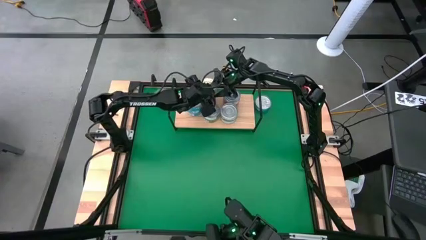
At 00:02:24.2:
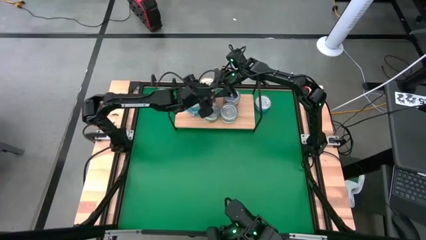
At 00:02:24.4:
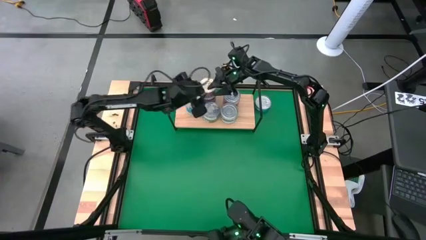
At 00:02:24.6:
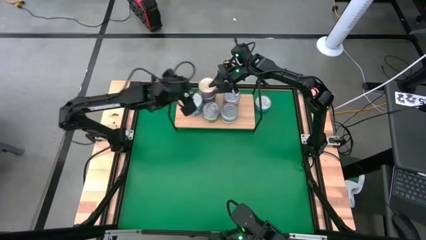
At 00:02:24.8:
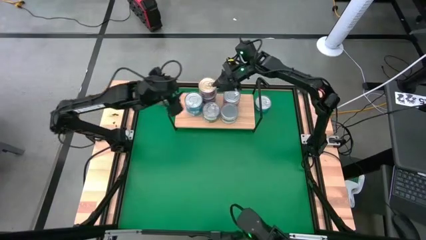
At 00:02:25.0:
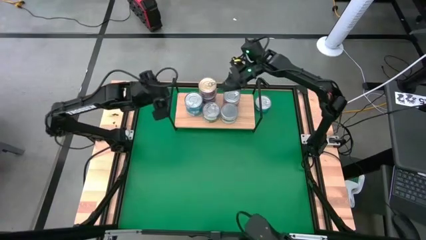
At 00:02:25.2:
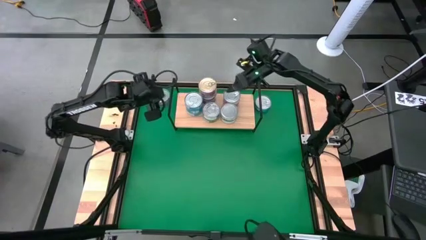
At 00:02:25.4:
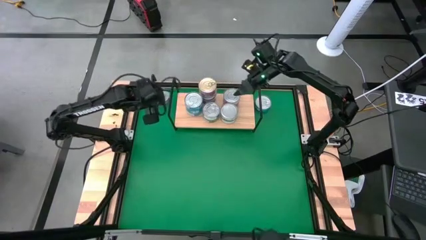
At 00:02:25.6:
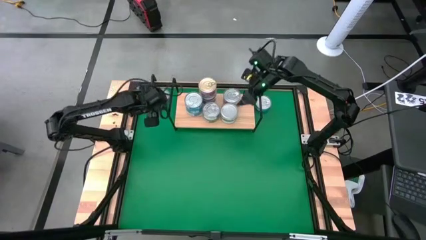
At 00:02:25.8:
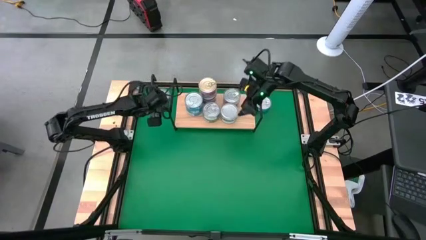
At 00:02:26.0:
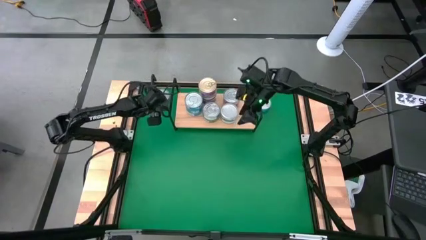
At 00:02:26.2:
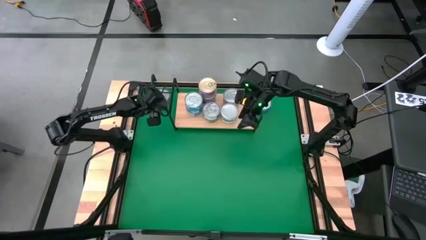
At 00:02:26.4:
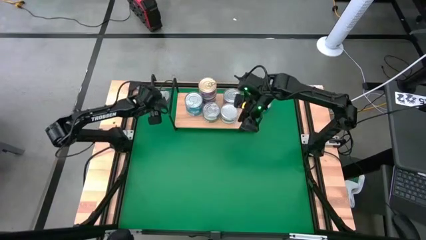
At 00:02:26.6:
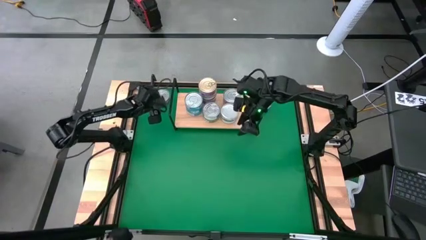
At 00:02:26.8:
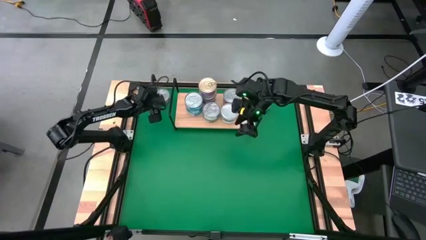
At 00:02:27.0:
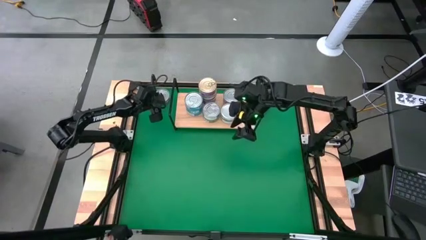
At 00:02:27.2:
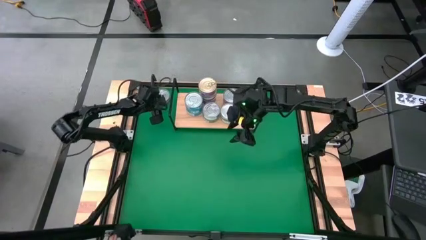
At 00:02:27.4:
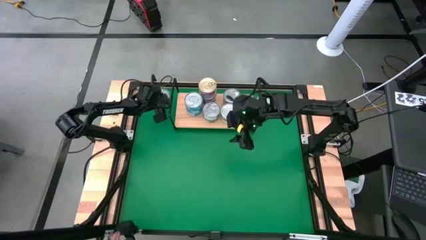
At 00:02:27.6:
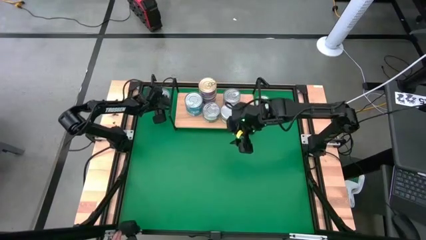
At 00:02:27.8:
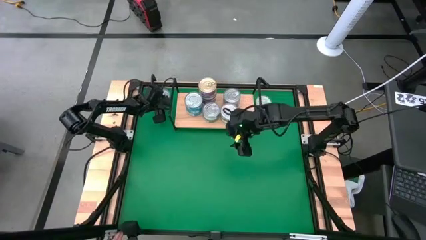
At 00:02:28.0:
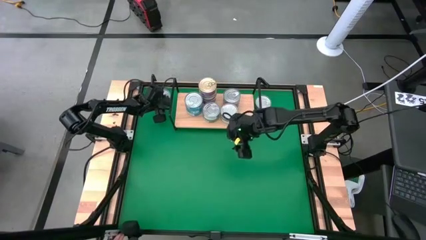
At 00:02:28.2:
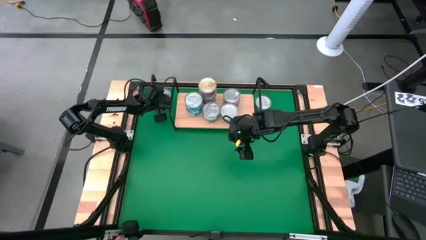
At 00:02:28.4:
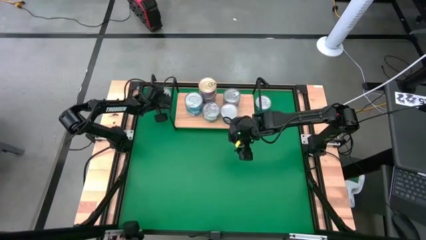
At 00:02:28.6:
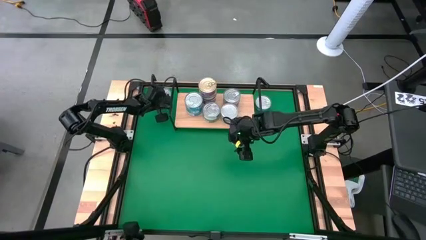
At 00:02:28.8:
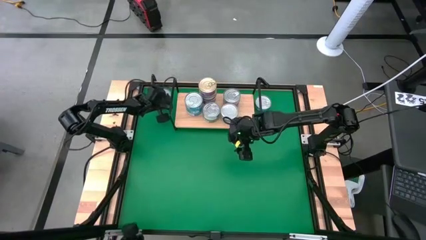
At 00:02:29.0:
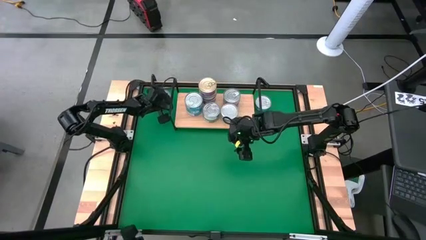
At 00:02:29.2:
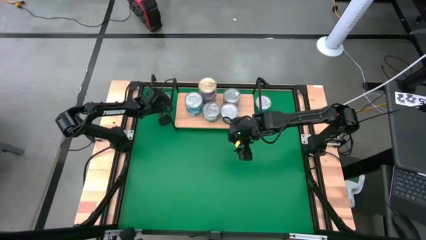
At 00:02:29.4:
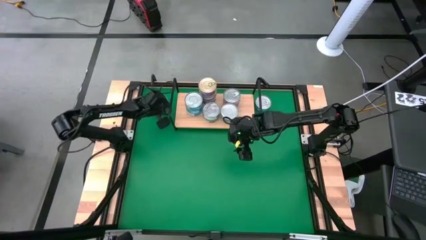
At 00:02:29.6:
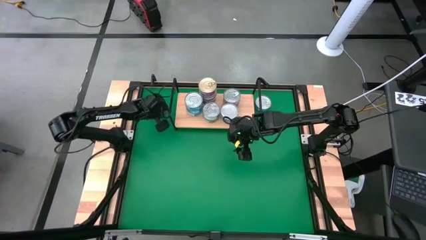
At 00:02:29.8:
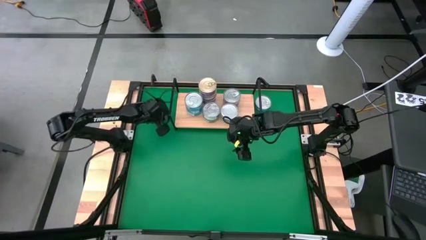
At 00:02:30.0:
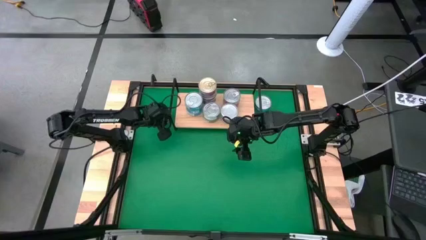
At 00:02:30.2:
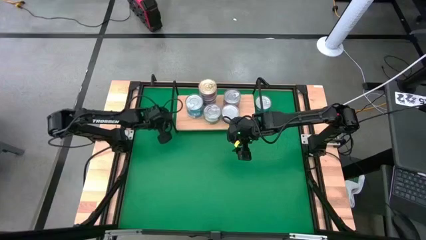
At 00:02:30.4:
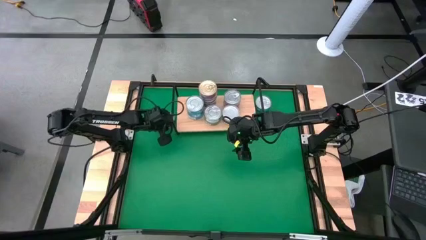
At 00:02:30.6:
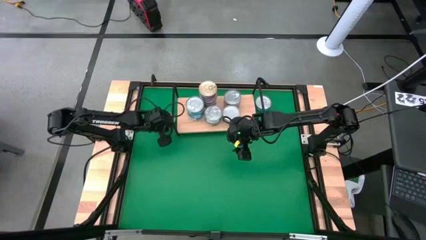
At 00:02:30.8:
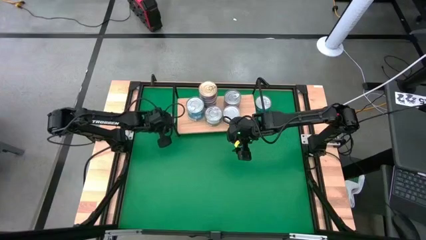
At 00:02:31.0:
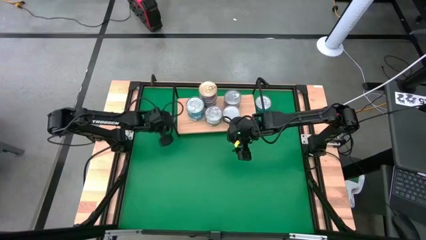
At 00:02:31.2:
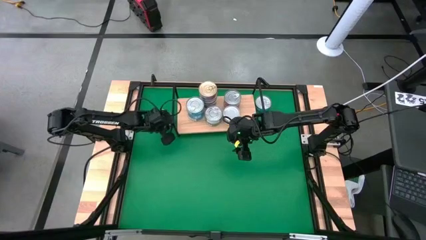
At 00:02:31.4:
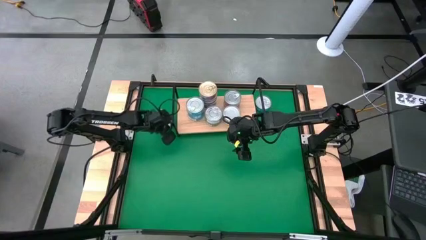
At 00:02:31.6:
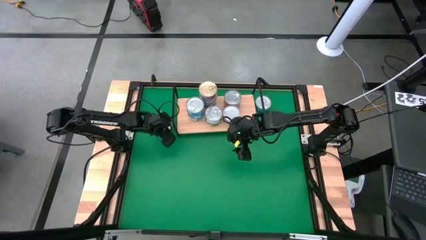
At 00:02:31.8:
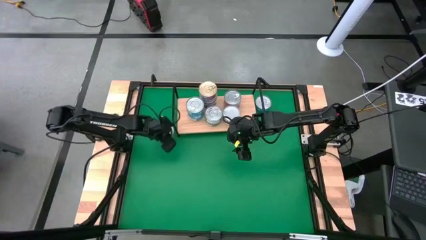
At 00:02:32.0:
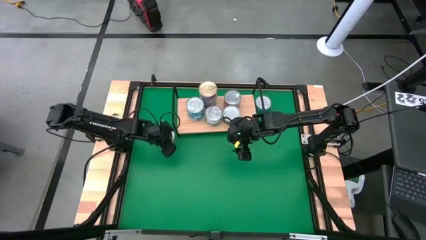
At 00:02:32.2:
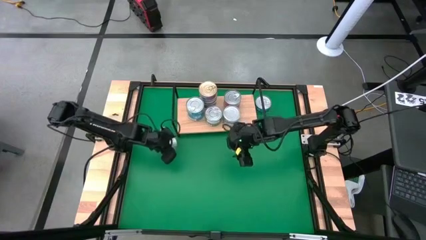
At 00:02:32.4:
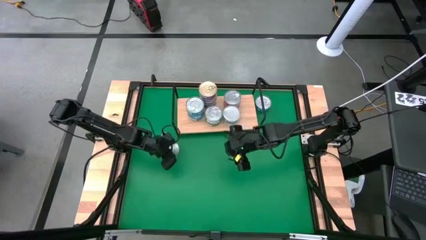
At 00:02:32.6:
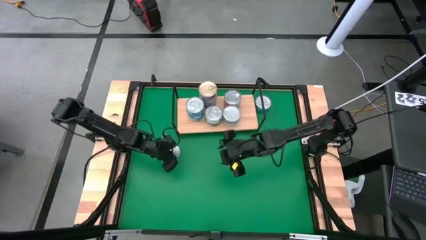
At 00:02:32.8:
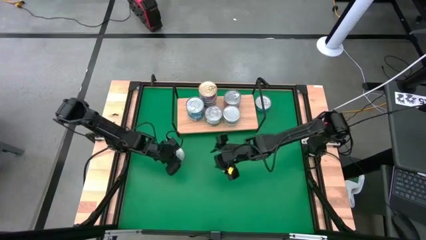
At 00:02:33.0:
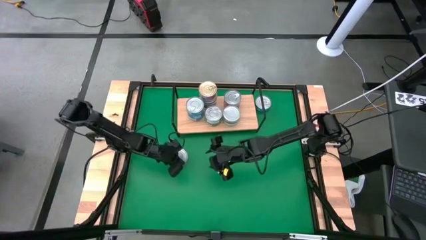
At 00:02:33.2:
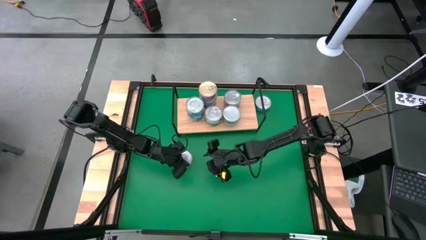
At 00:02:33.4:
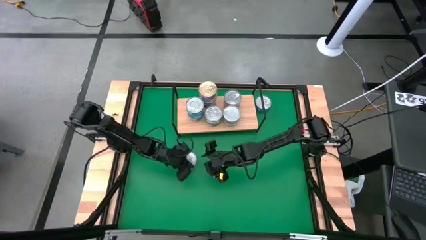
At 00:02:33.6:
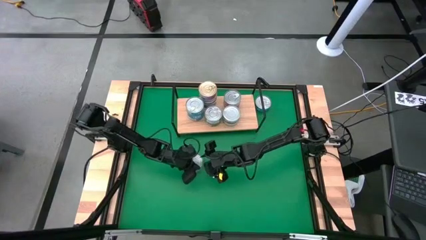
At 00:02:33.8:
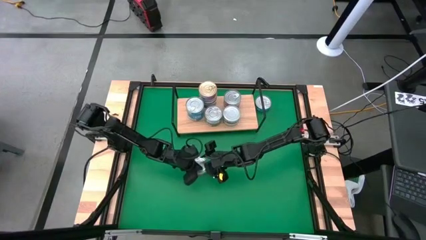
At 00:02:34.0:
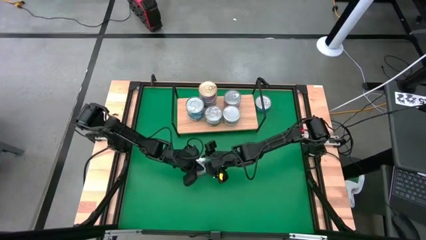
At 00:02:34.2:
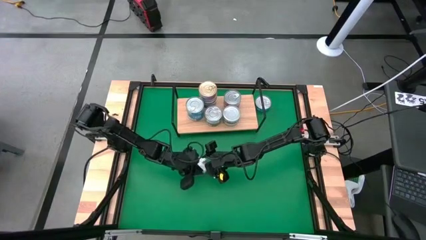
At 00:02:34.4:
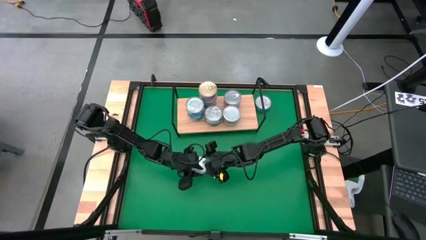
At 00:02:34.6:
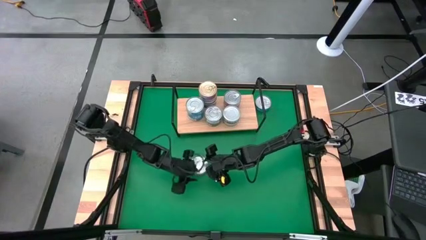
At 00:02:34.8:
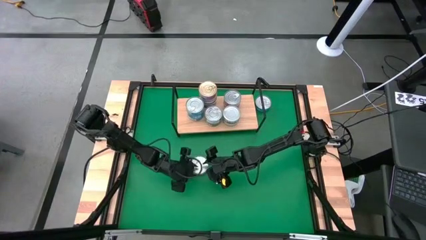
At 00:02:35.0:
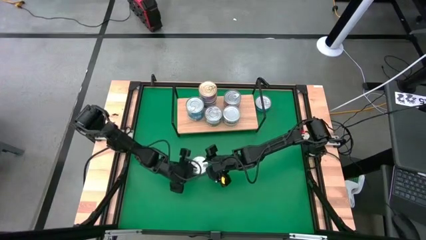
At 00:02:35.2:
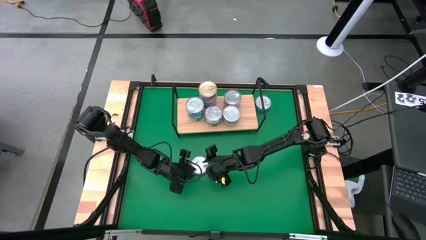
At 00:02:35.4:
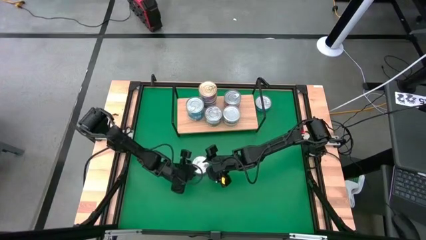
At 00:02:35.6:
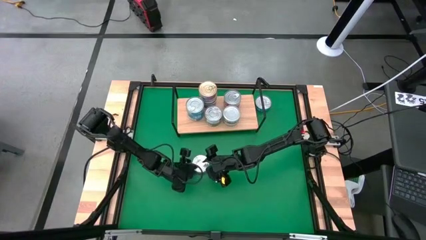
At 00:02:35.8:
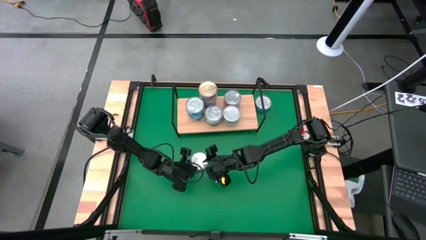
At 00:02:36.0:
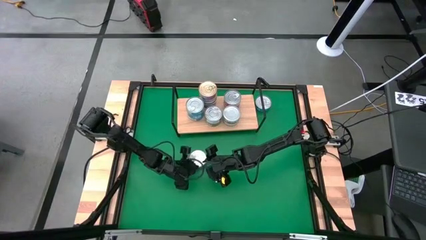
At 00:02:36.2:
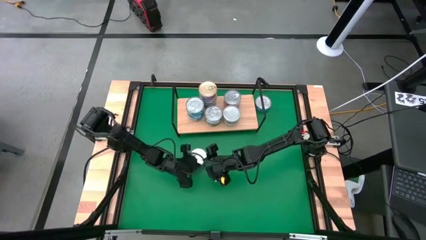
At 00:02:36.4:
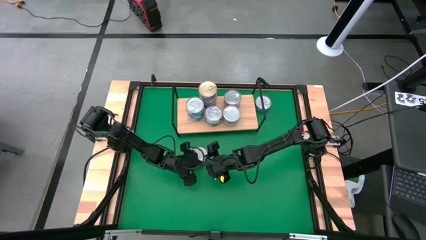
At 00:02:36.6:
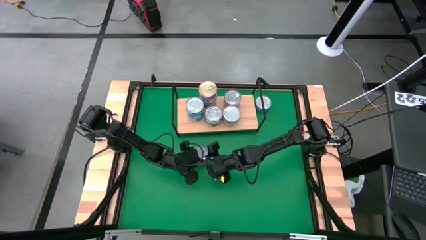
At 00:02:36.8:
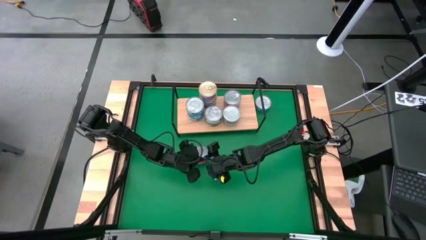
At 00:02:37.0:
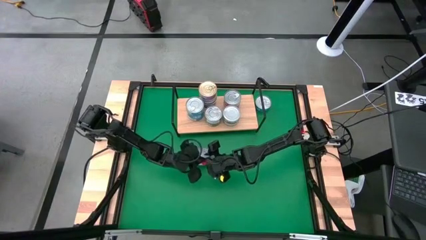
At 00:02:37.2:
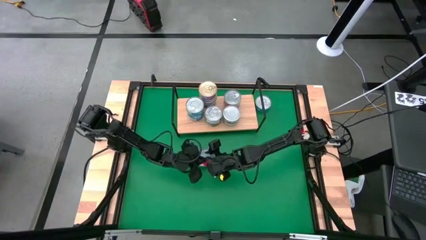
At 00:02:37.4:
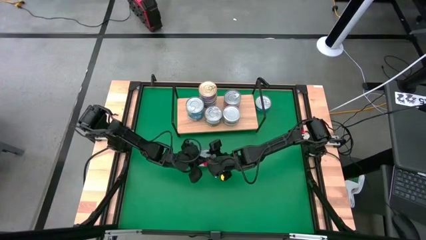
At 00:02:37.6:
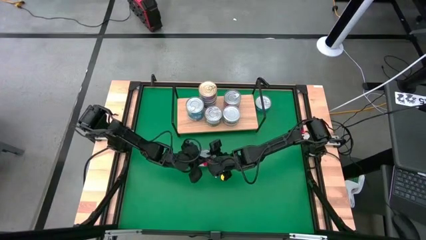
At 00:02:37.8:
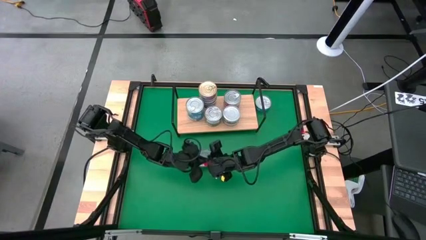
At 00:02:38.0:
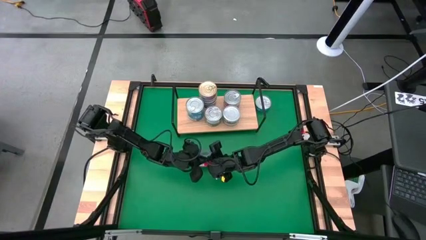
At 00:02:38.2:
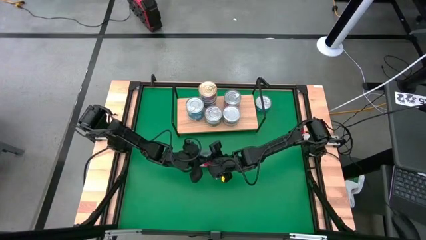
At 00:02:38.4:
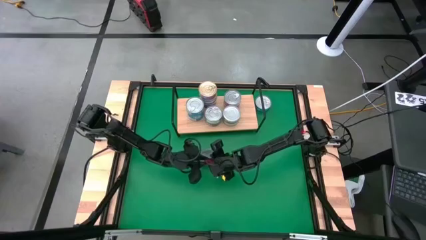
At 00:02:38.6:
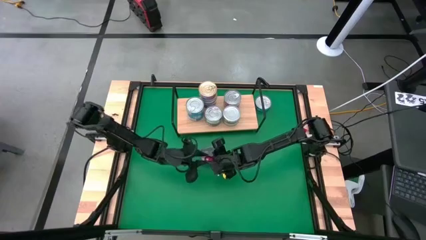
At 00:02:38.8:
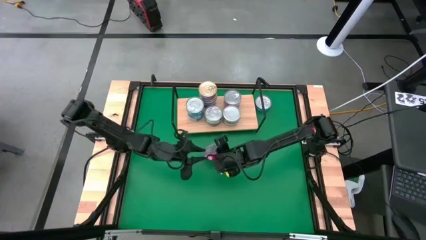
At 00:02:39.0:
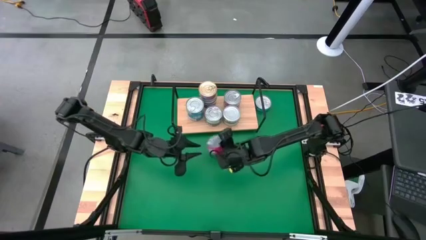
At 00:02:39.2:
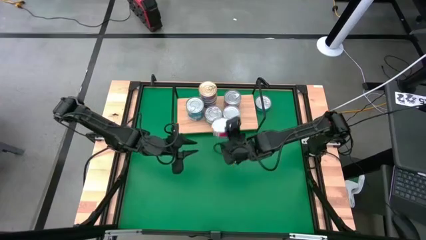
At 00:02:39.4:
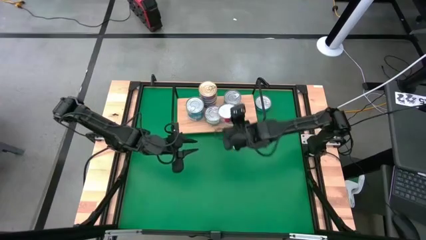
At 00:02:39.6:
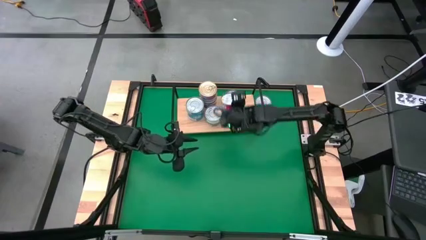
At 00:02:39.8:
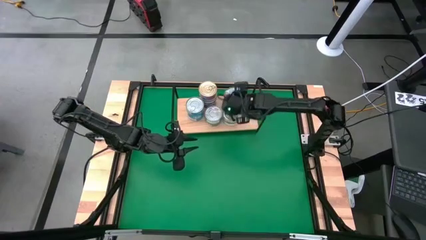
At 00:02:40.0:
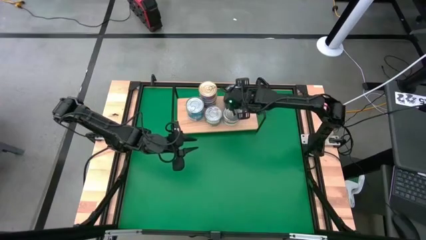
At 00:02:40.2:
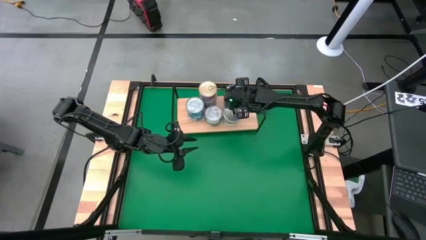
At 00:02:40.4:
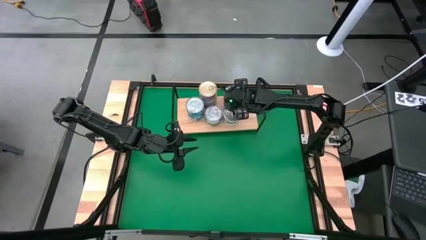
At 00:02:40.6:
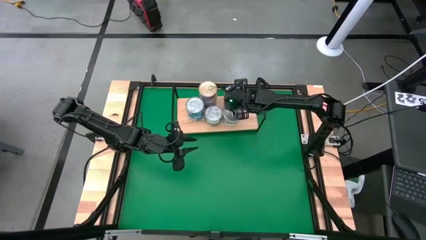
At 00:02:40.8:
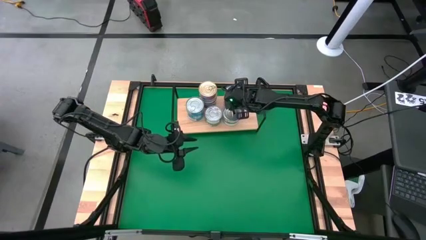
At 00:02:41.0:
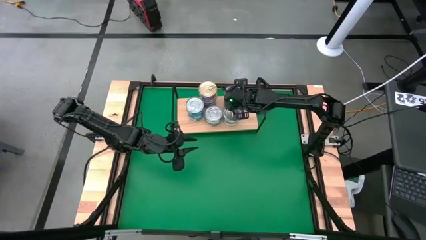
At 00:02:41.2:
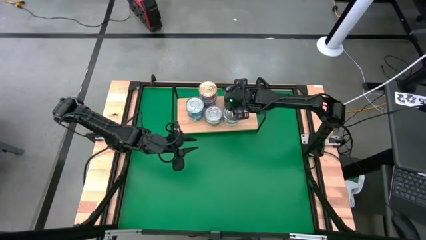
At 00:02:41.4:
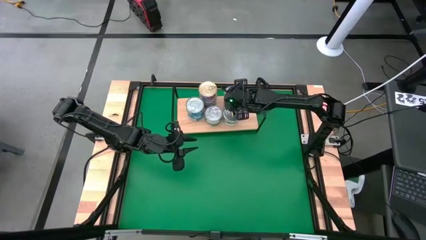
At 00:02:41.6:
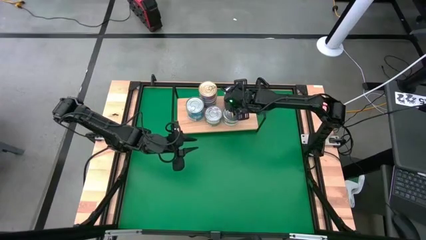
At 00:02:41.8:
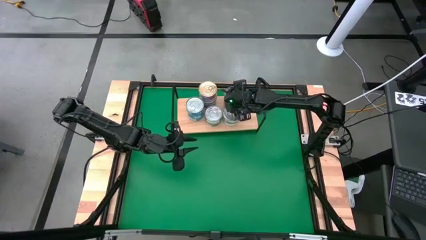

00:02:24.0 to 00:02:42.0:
Task: Stack canned seafood by type on shelf
Stack the red tuna can on top of the red tuna can on the shelf
